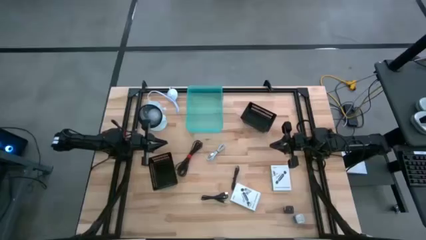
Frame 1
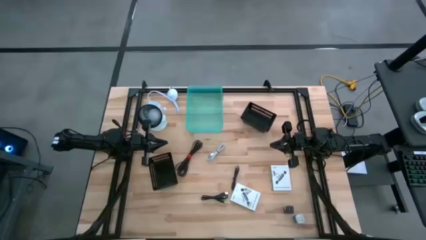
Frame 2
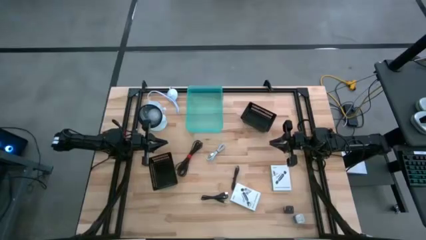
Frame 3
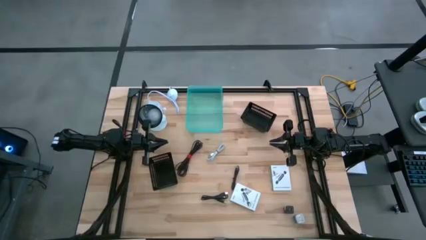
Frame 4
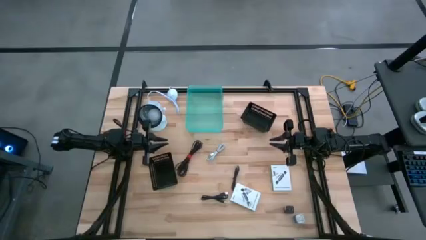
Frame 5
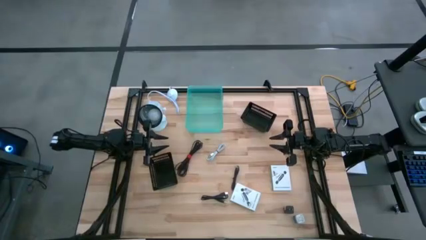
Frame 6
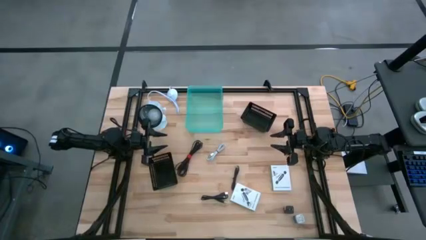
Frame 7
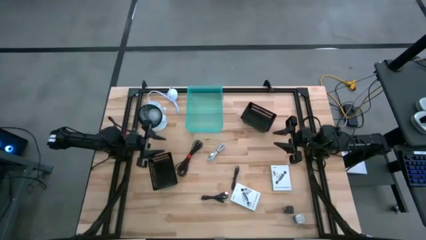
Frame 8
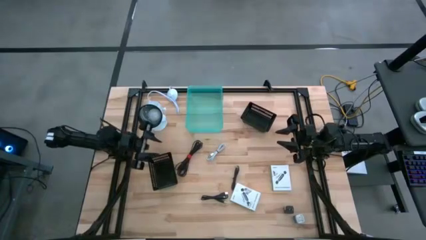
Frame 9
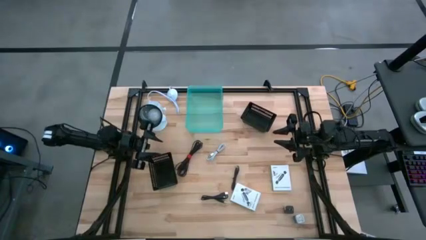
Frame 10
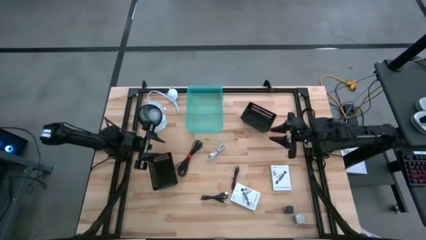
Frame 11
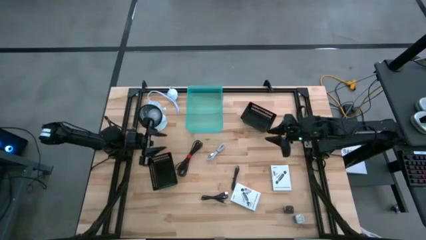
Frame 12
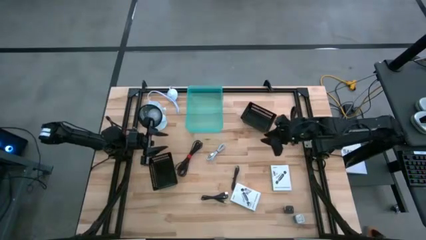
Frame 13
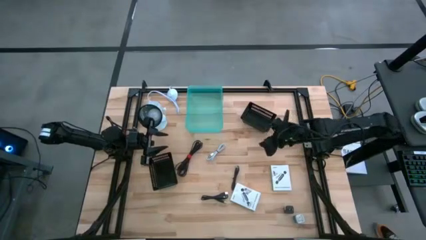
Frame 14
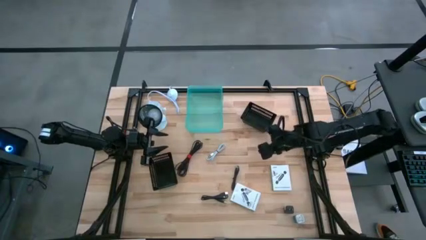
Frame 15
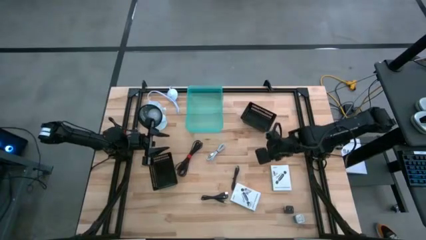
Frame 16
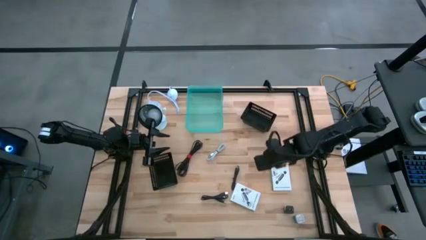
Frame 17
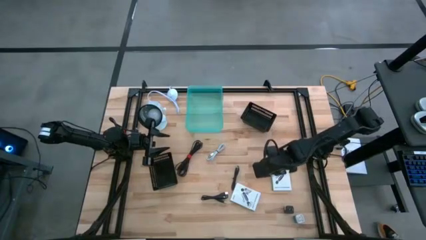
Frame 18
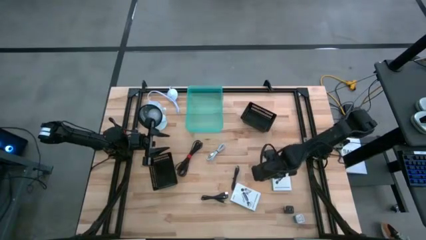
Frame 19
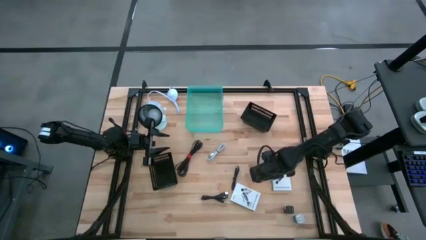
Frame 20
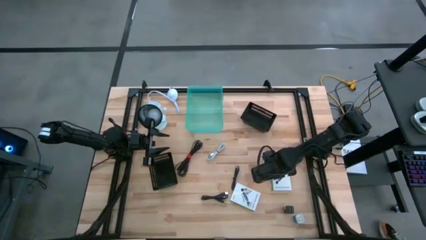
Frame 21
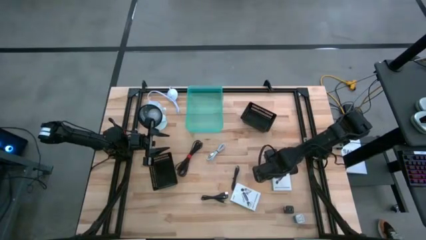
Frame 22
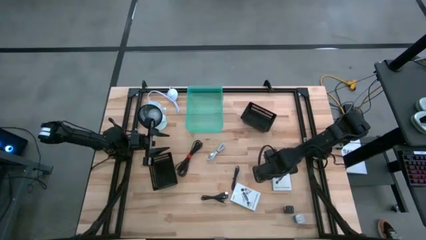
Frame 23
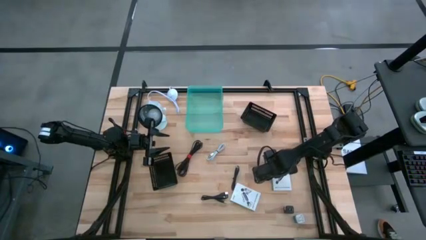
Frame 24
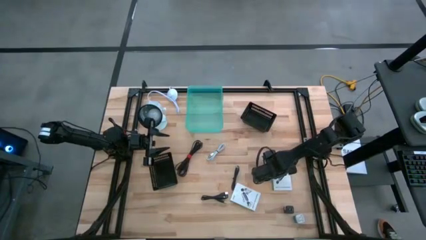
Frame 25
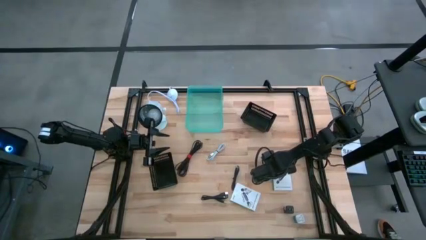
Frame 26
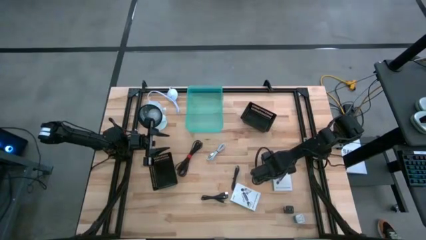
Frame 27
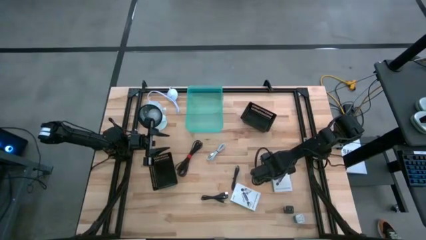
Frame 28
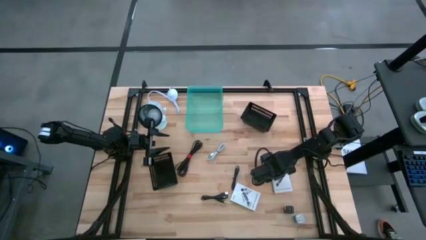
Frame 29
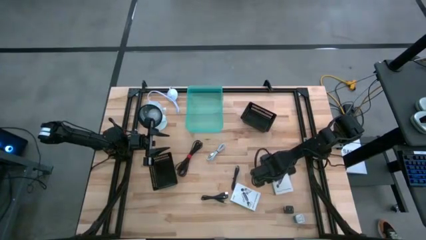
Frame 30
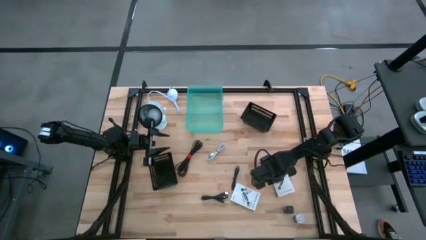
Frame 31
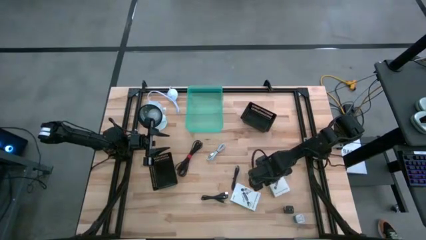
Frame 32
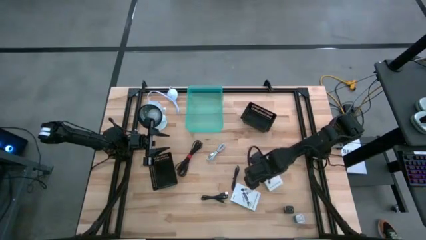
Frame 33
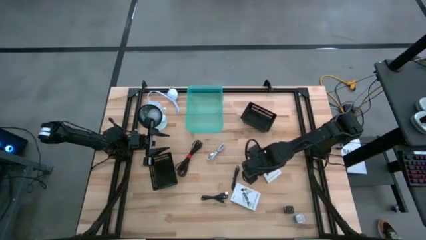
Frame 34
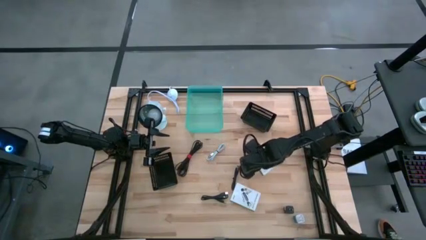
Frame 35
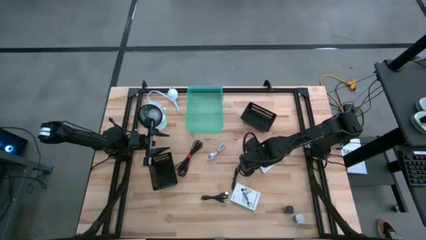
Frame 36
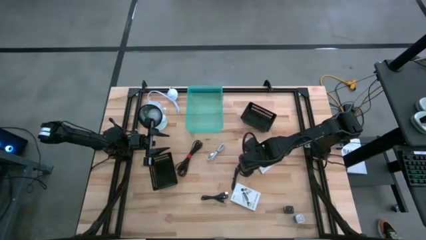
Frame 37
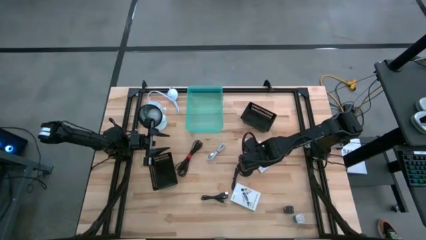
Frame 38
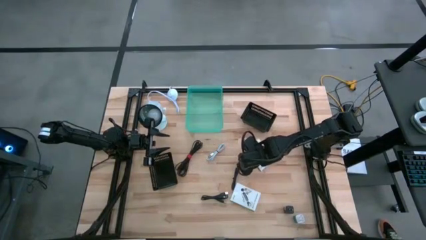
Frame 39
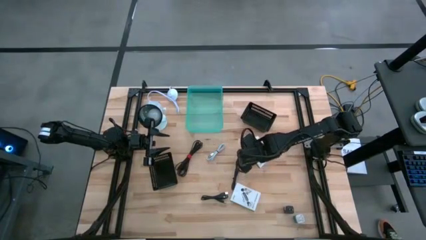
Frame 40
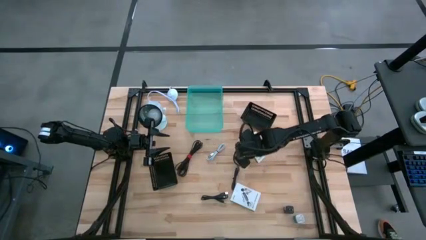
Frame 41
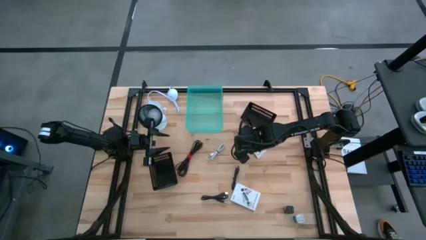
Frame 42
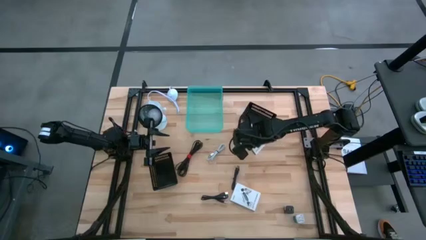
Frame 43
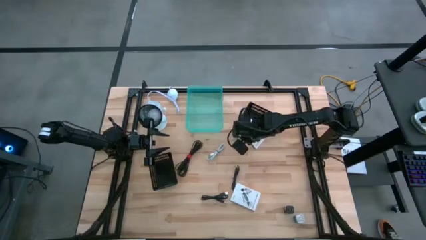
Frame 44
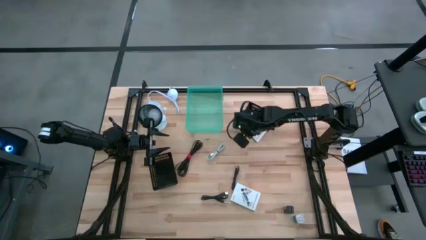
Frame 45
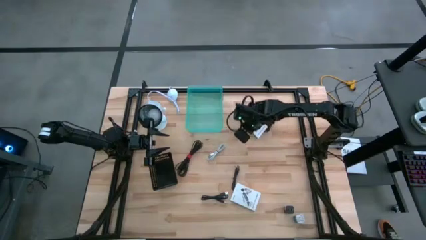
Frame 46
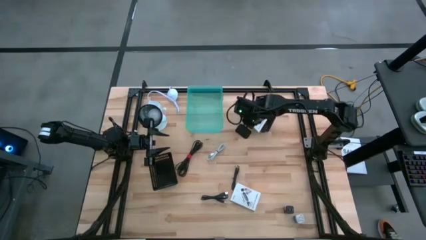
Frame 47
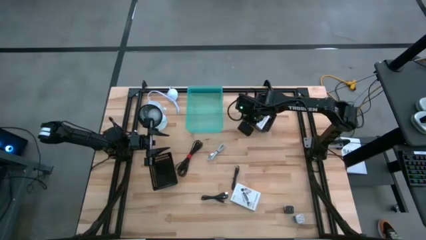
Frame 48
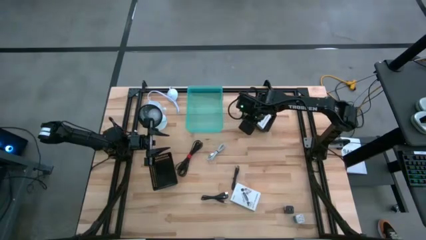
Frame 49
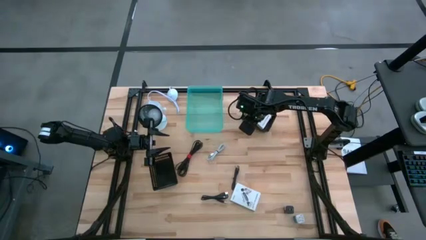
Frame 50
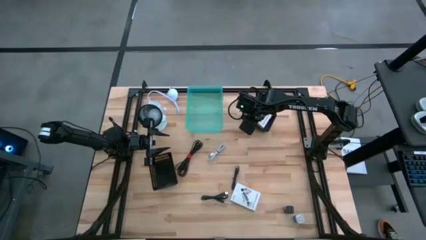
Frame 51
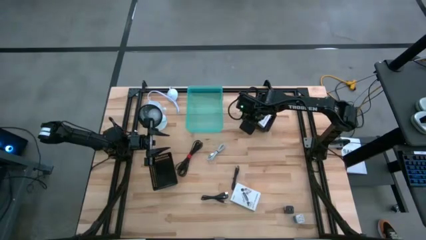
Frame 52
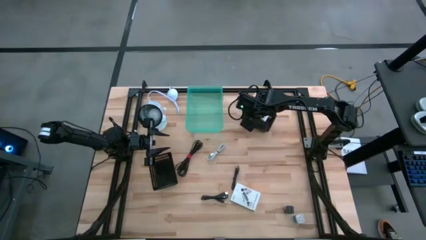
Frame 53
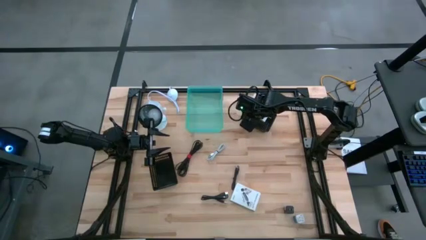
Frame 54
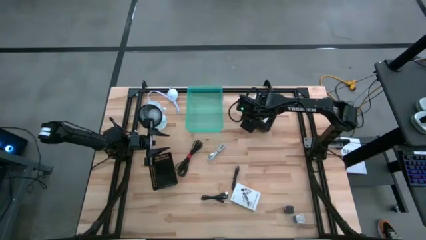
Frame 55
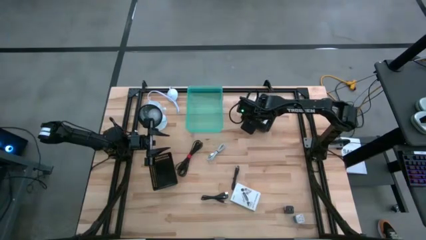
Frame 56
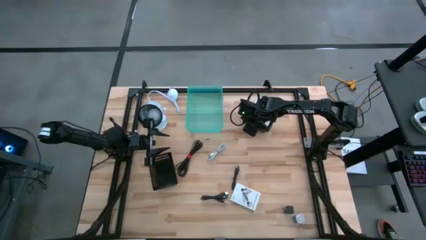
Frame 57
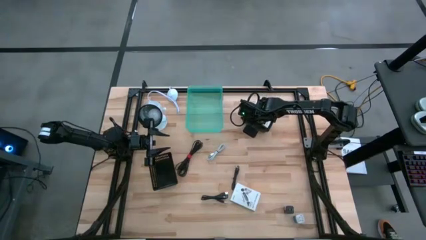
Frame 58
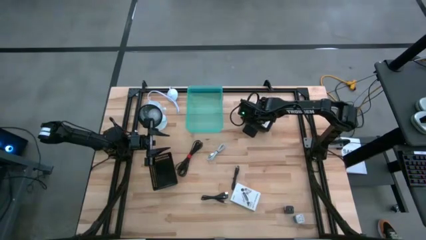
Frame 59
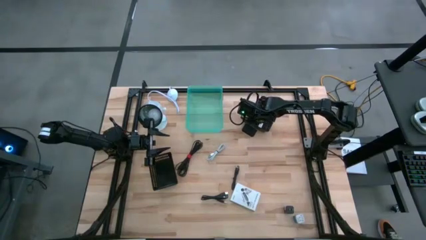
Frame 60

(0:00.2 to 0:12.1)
Task: Pick and place items into bin
Put the right white card reader box into the right black bin
